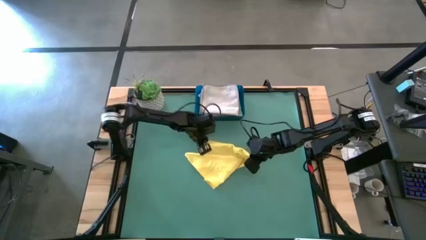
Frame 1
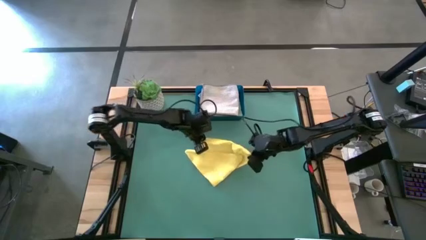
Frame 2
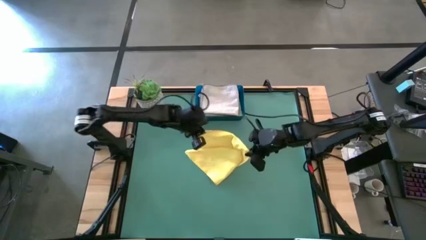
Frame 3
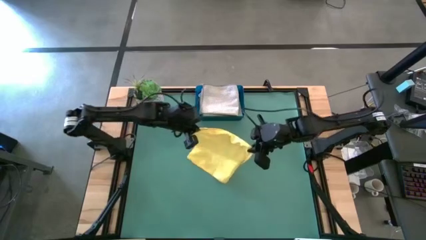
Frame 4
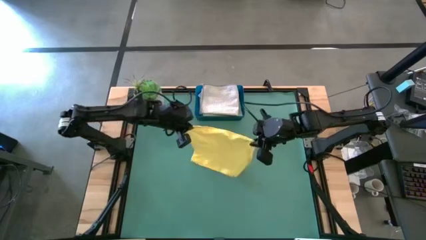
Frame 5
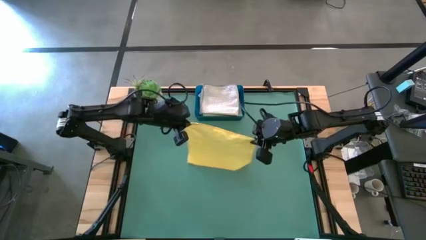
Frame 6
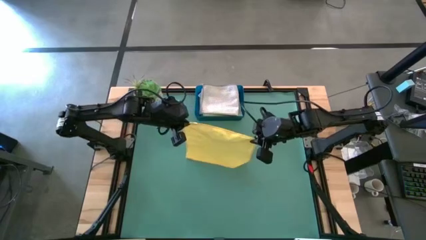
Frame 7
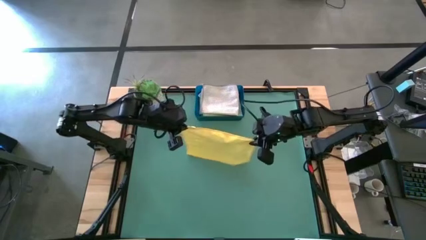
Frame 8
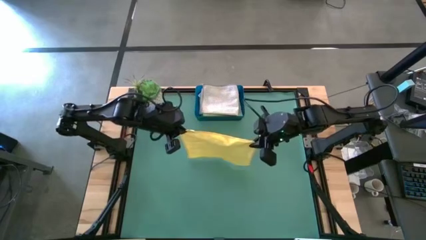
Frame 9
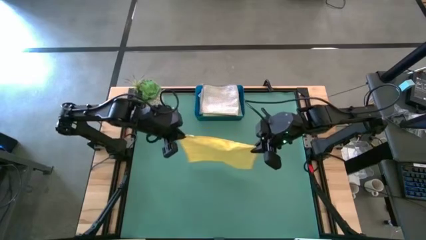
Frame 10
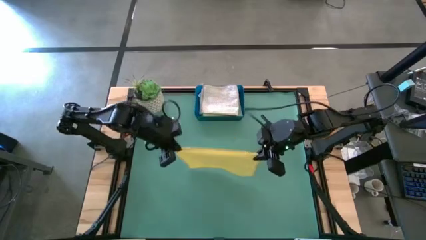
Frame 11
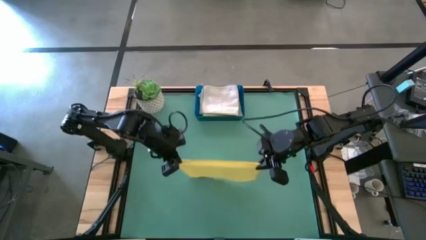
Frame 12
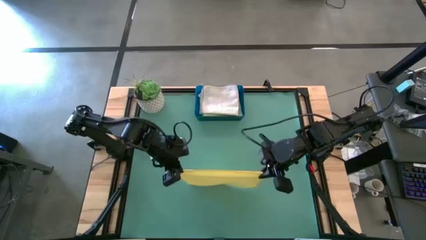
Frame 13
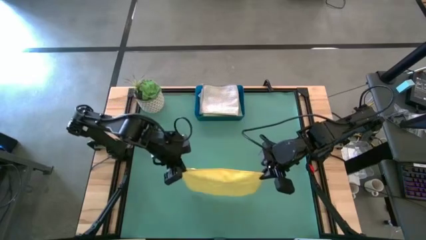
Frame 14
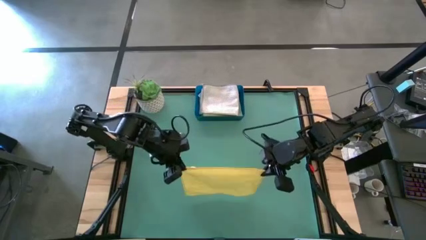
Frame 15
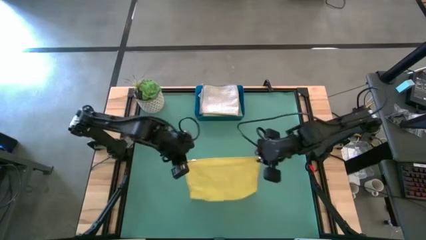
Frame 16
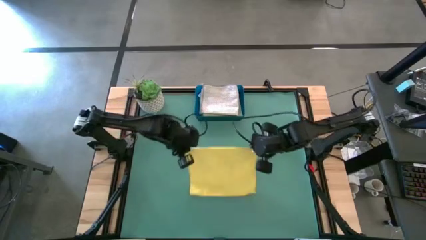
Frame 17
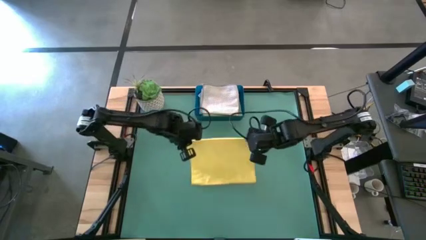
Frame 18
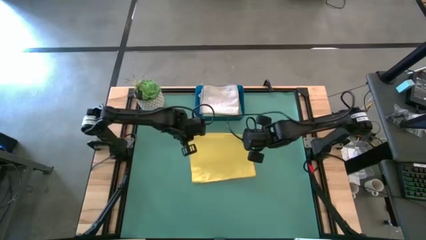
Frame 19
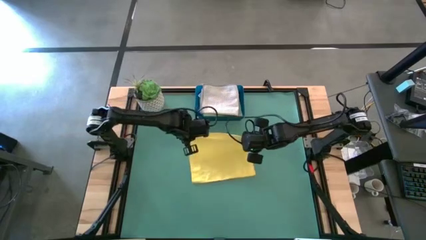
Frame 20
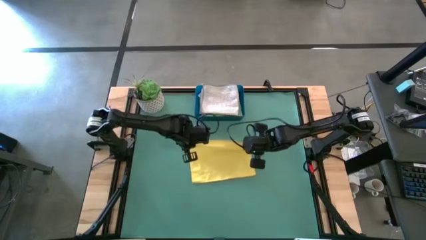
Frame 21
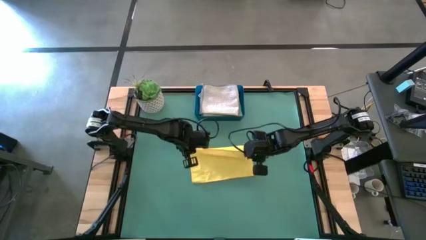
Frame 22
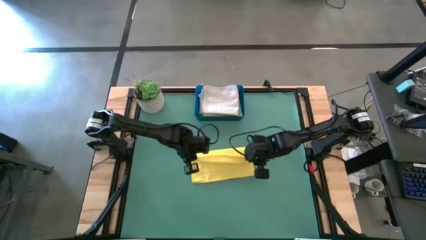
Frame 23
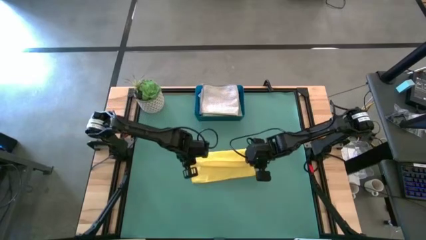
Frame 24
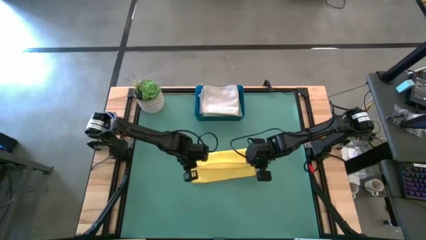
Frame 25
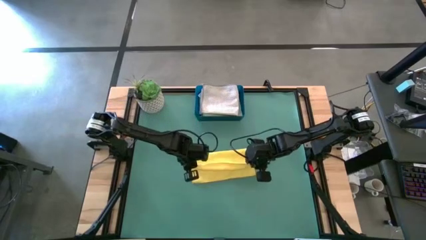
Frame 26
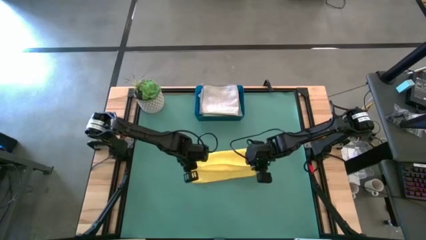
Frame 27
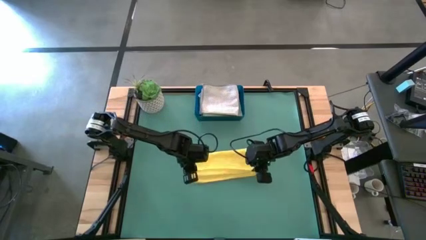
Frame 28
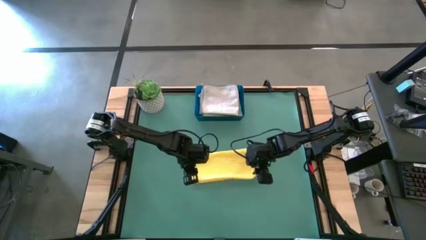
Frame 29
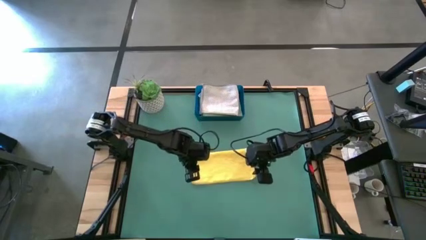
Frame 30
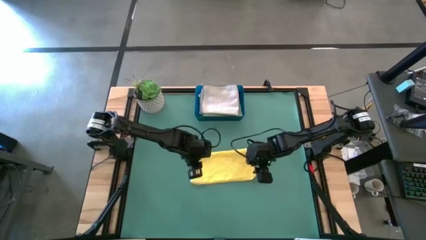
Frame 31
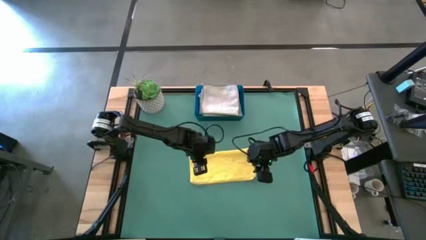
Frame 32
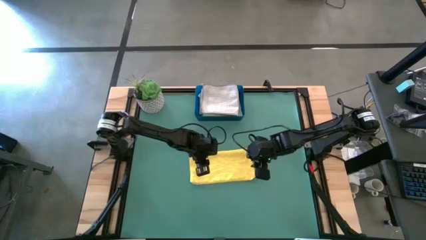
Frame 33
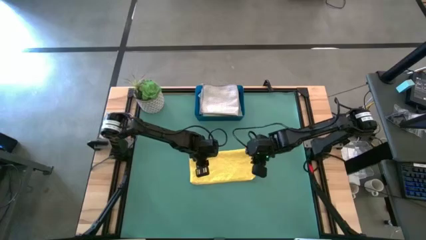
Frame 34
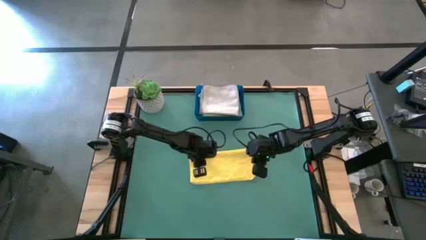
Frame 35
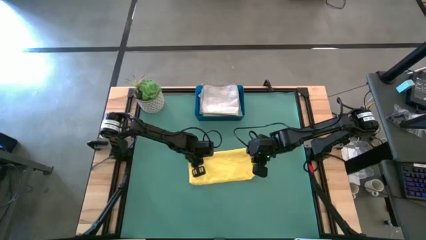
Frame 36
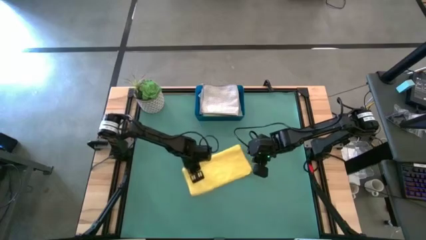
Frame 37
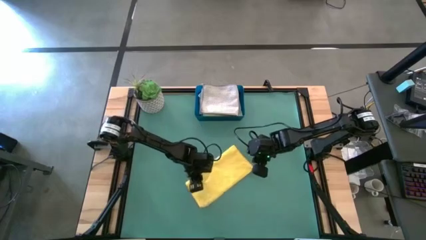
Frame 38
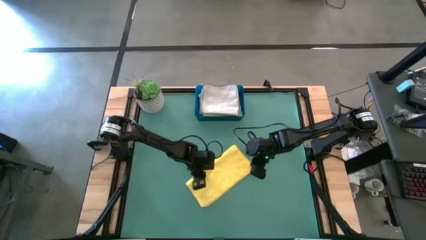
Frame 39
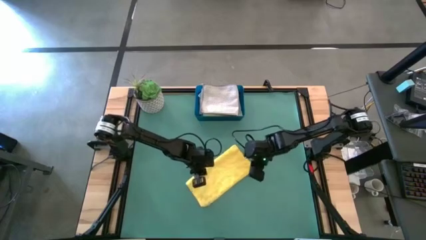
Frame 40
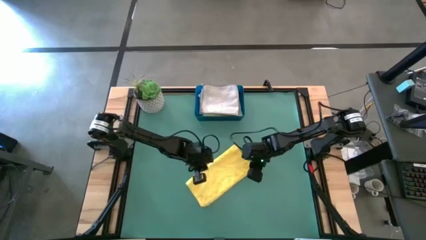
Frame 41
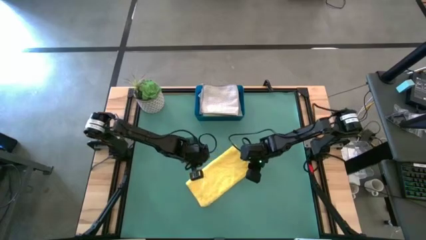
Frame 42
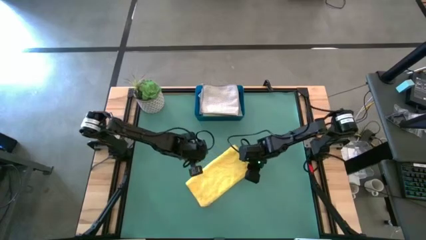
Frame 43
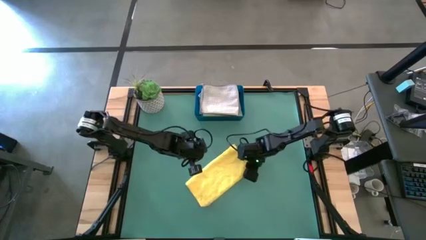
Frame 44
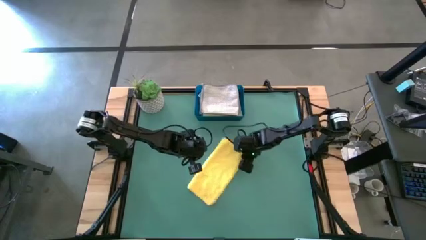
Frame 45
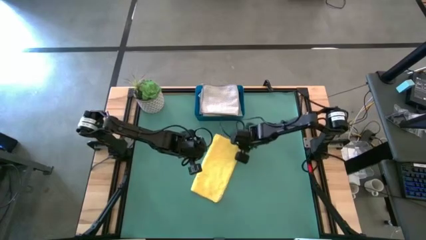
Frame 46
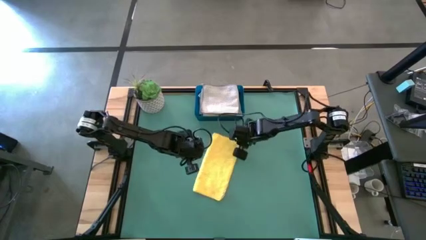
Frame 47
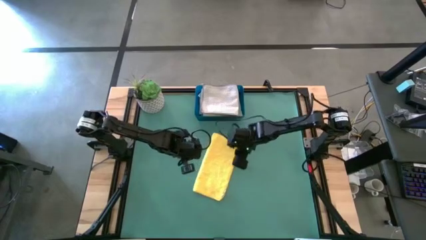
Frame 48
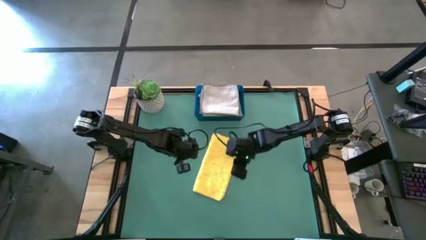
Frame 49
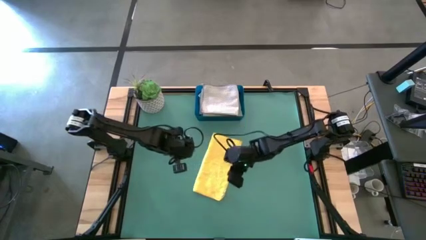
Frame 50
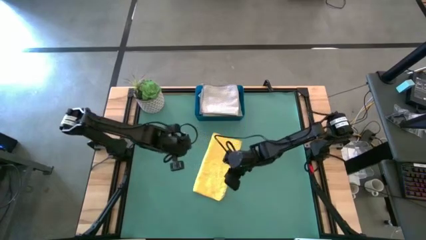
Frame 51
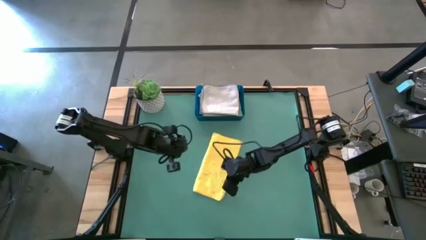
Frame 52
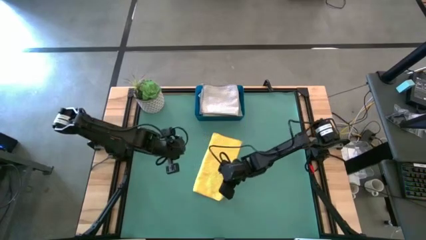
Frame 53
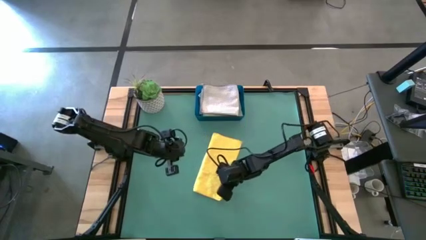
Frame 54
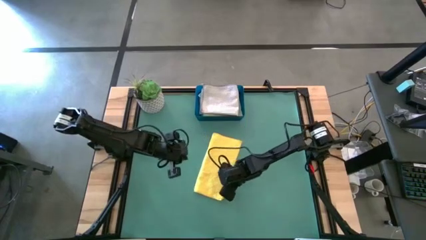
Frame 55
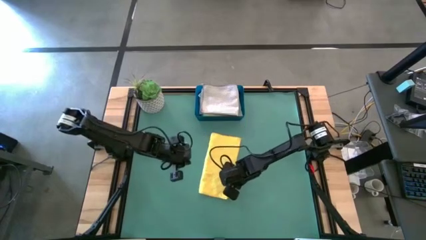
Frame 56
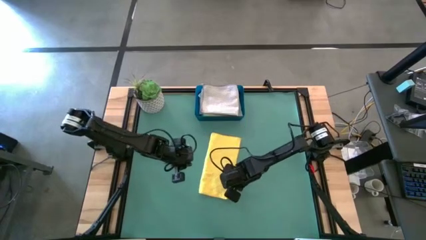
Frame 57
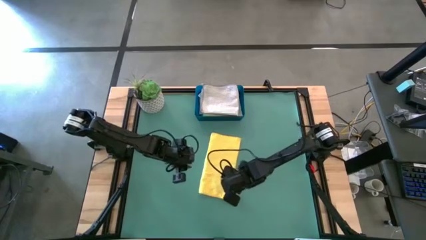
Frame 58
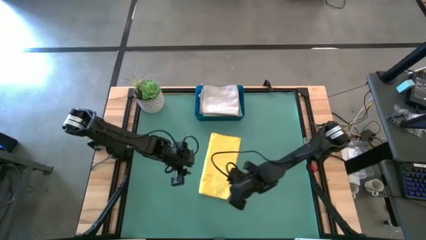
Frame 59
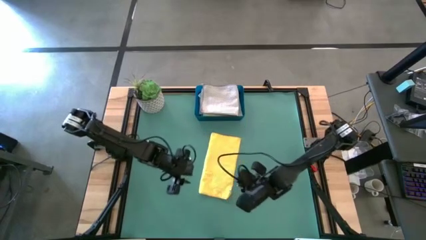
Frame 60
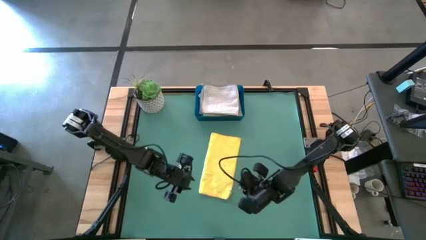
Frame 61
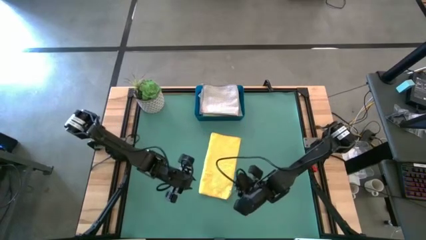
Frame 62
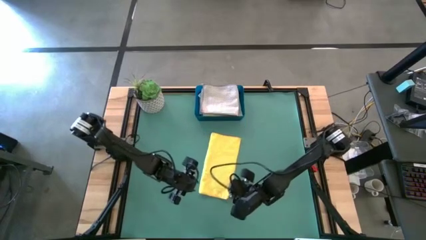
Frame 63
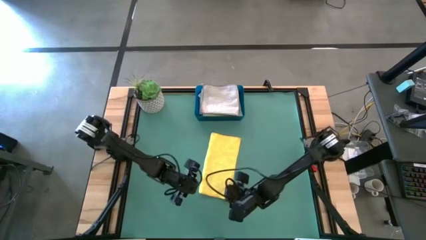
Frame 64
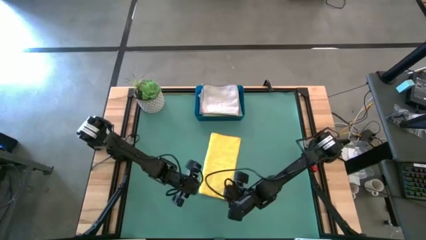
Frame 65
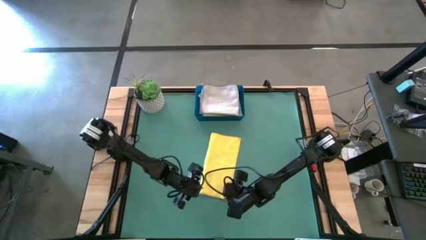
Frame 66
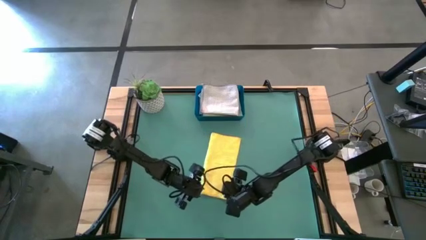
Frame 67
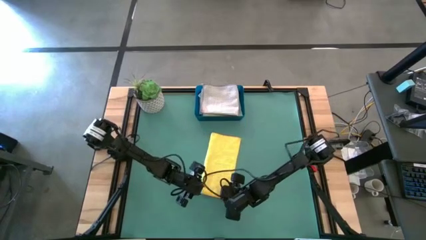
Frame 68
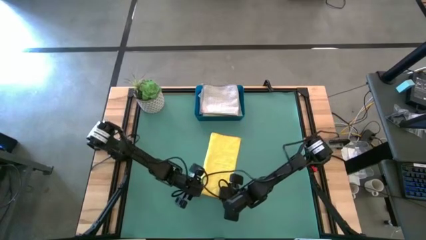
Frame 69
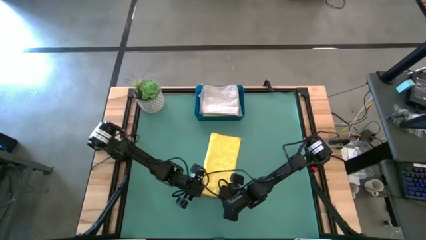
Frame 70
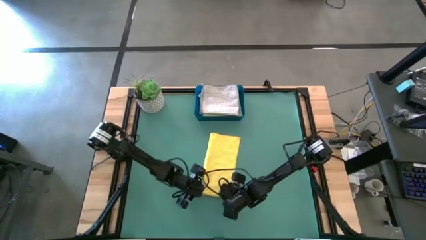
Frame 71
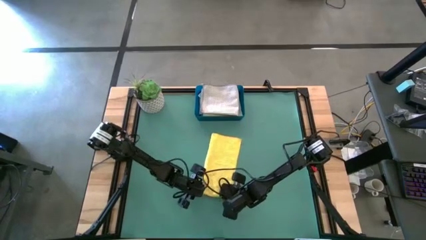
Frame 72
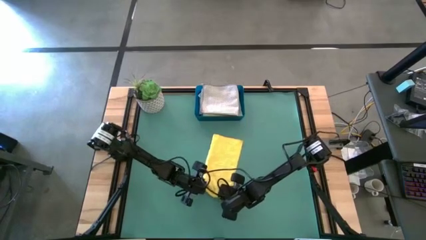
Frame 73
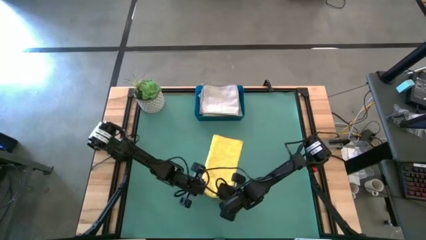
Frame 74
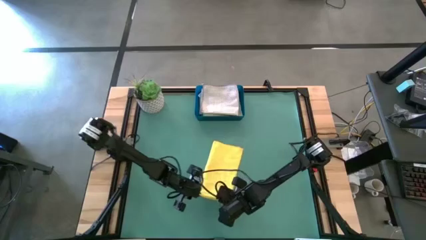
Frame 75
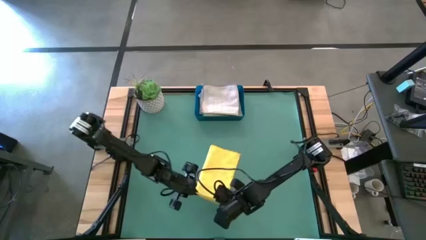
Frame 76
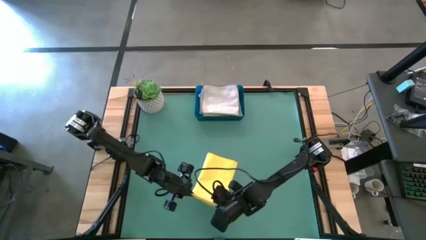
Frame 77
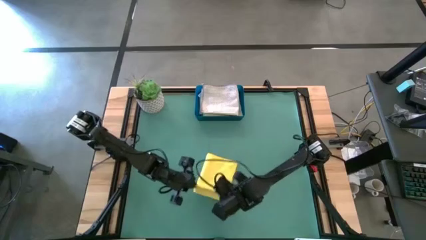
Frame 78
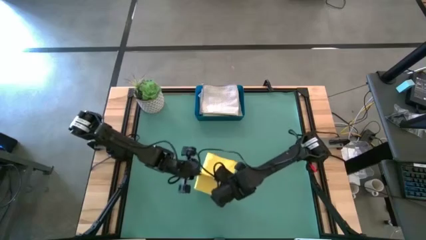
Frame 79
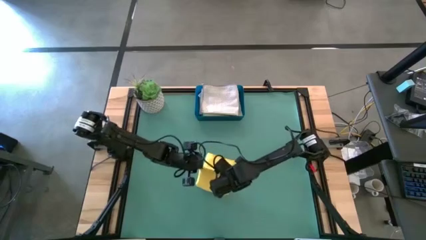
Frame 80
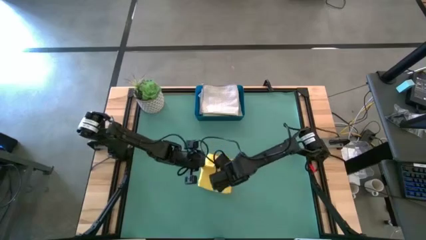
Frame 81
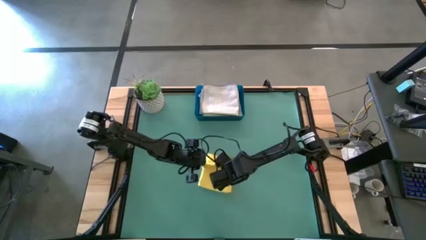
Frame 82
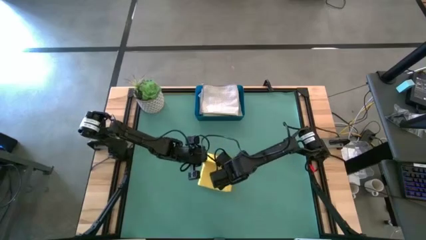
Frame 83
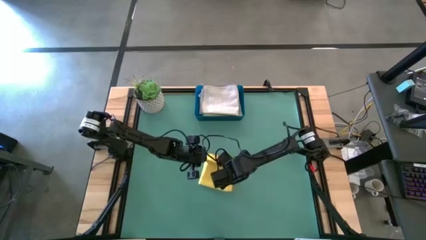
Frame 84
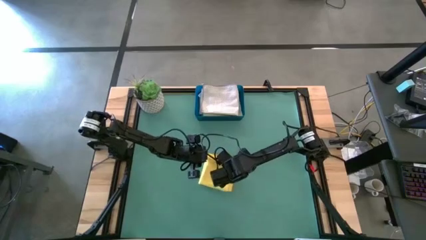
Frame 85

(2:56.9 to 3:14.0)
Task: Fold microfiber towels
Fold the yellow microfiber towel

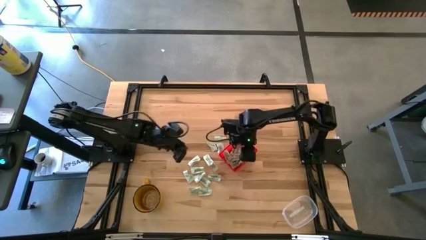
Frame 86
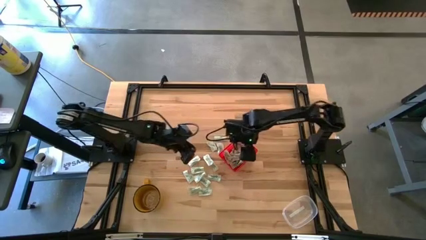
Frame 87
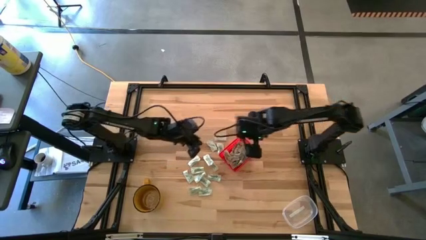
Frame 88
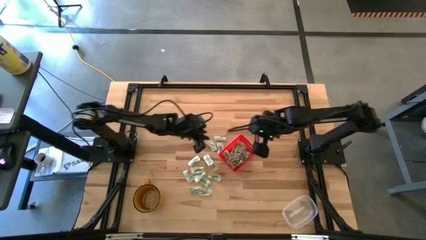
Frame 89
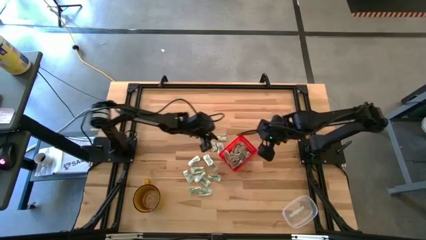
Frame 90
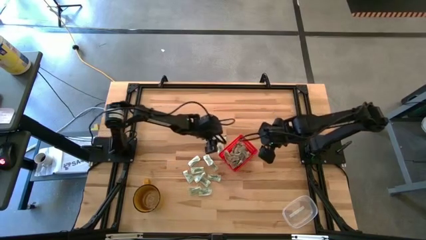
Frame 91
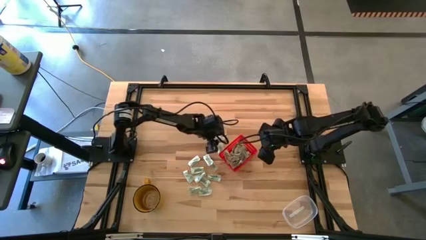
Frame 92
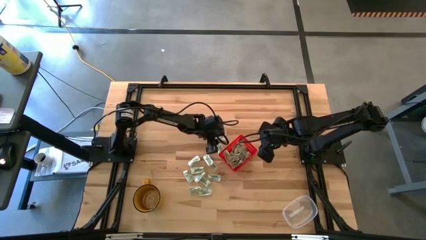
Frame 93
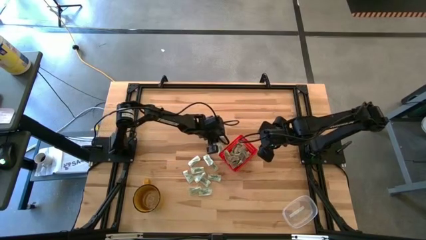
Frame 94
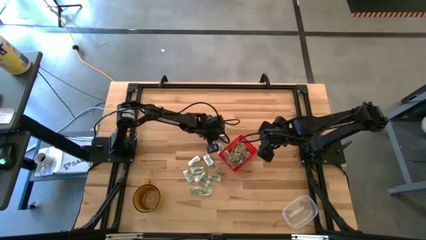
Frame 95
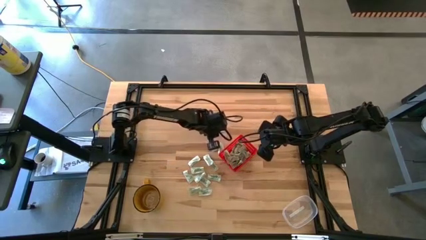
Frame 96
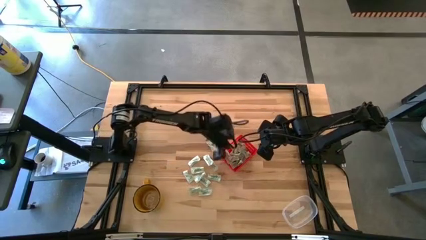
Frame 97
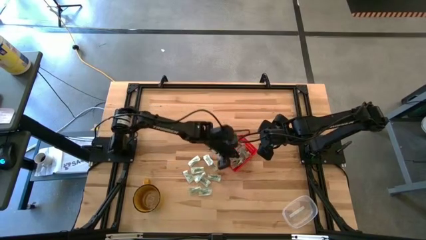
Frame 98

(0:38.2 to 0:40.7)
Task: Pick and place items into bin
Put the light green stevia packet into the red bin
